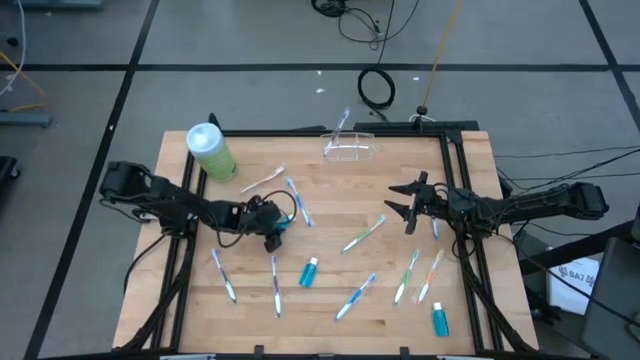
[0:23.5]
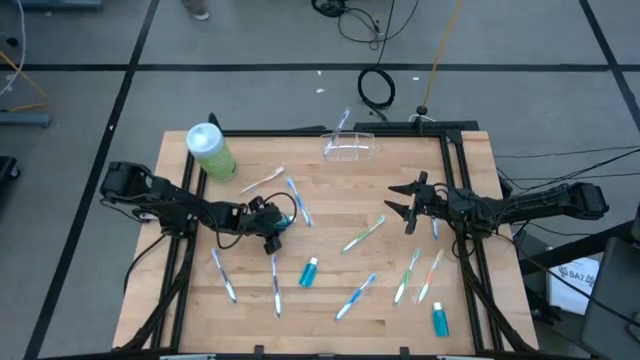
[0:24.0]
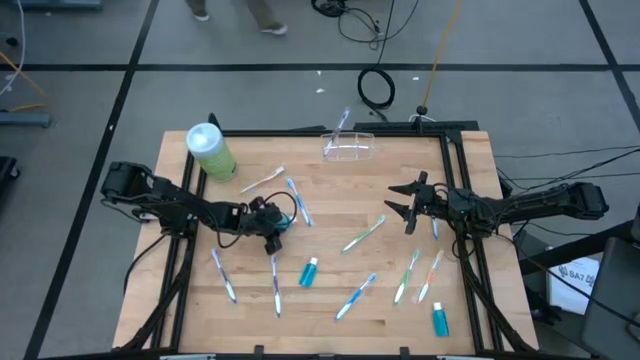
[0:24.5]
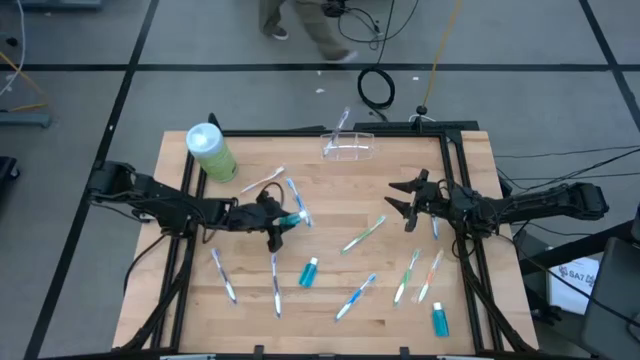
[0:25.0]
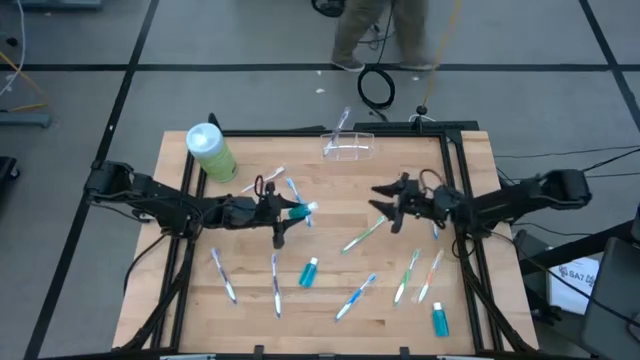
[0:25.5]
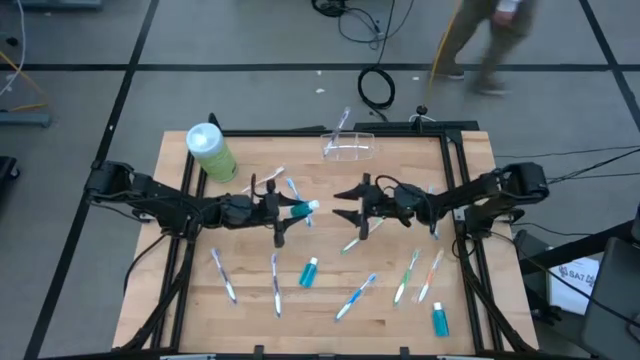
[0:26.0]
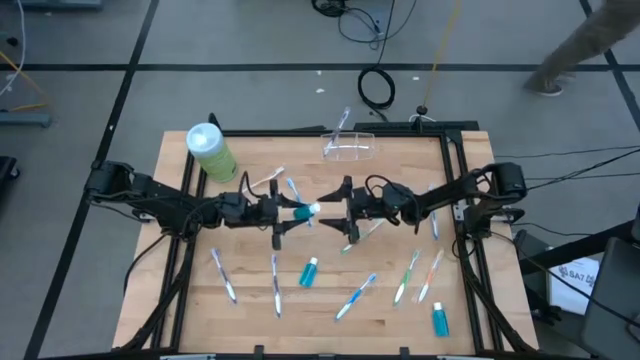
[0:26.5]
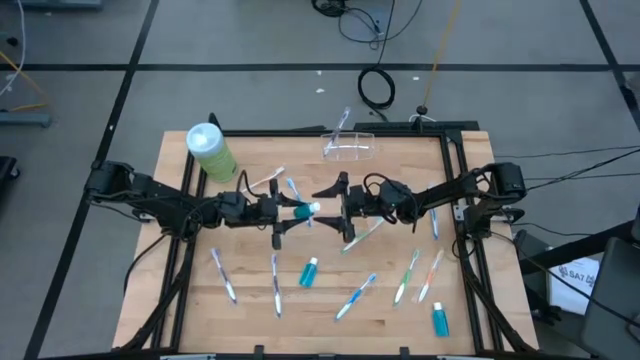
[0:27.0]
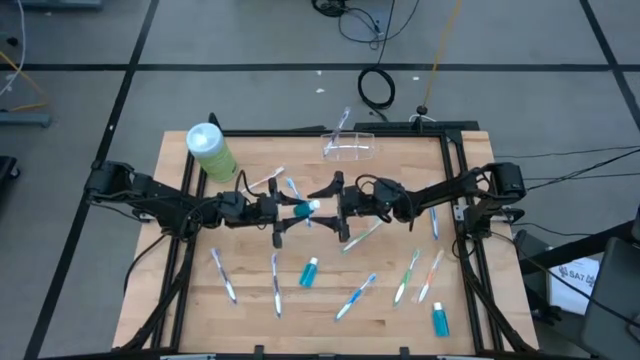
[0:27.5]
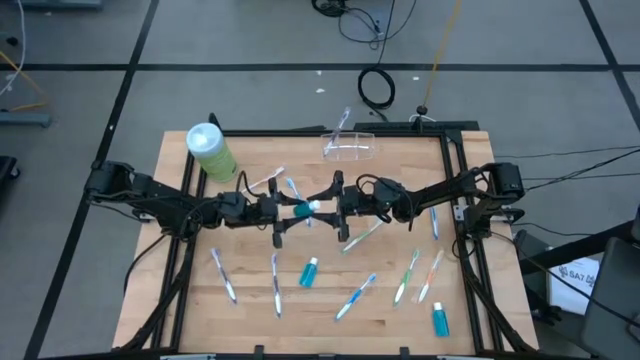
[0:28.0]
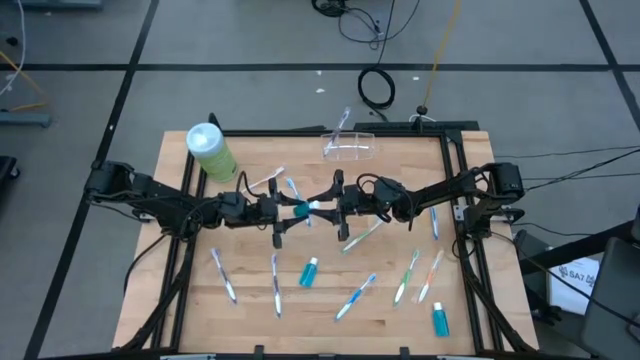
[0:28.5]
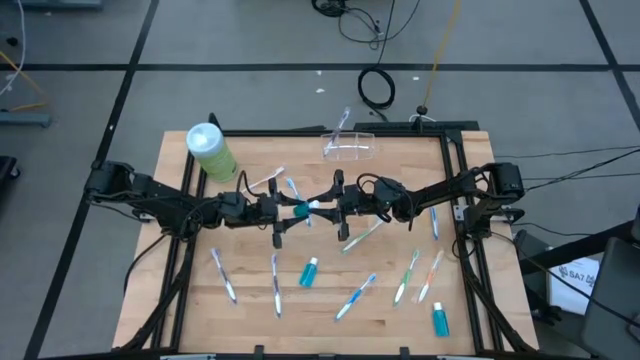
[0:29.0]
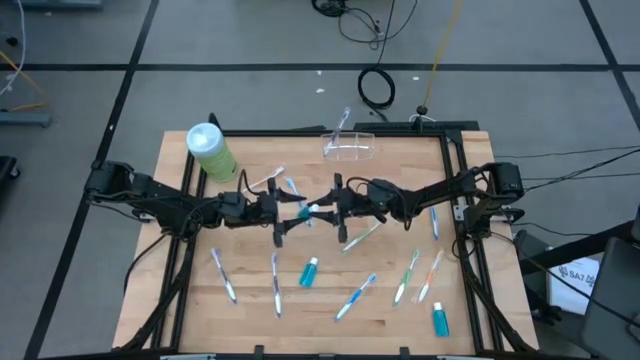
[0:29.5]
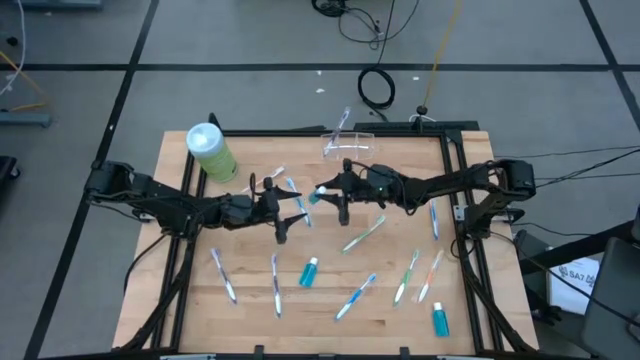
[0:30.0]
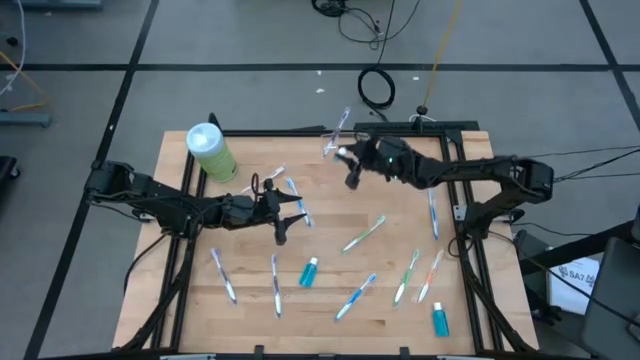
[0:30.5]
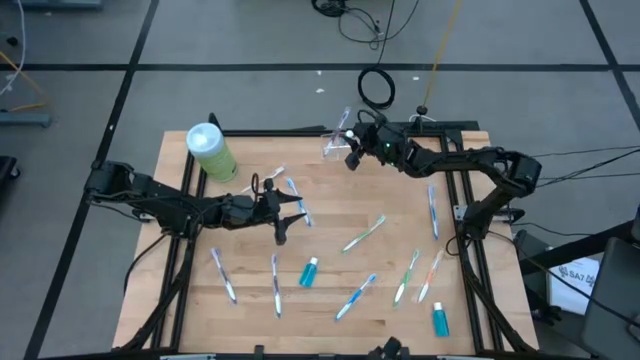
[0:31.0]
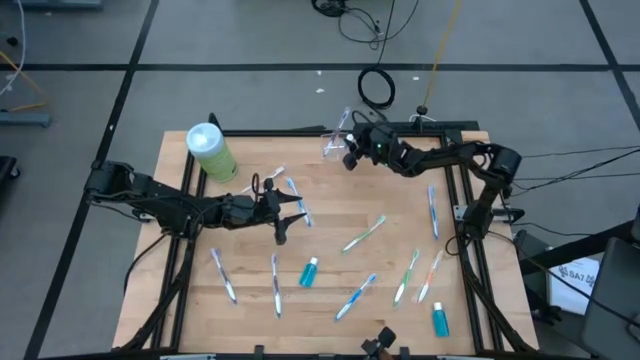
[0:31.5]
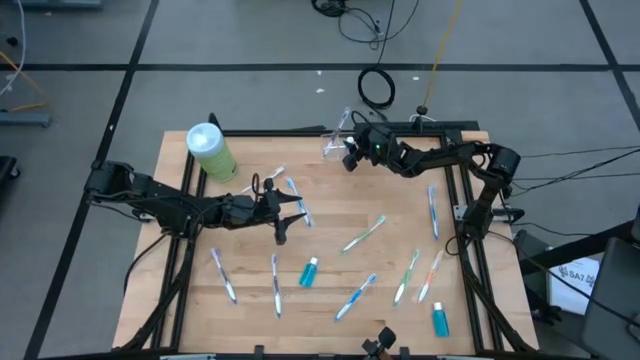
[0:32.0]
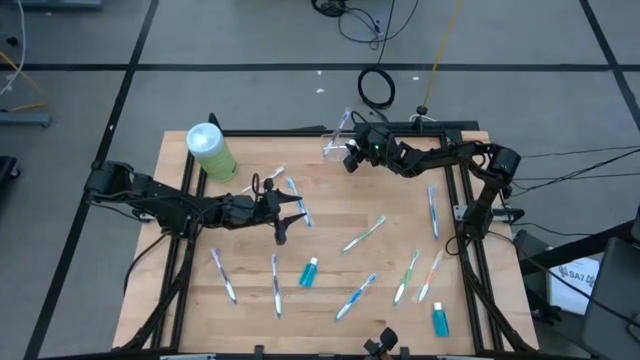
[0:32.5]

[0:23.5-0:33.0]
Task: Pick & Place toothbrushing station
Put the top left small mouthwash bottle into the middle section of the transparent organizer

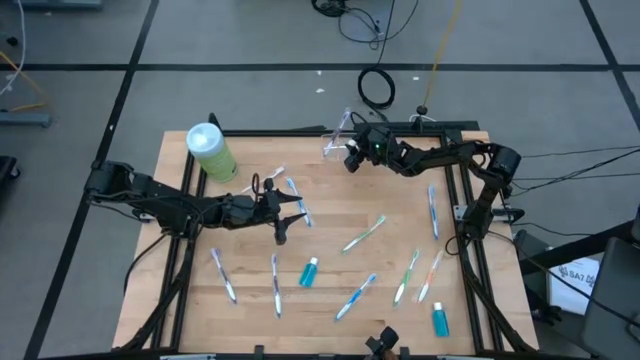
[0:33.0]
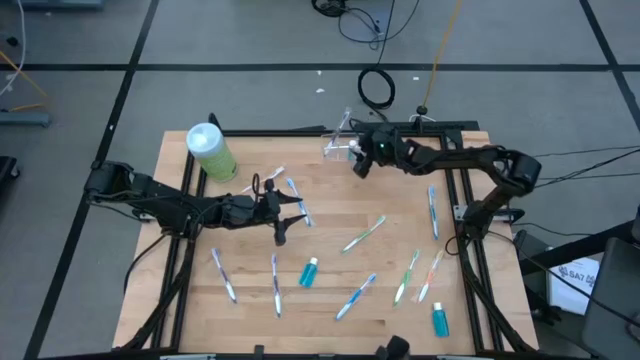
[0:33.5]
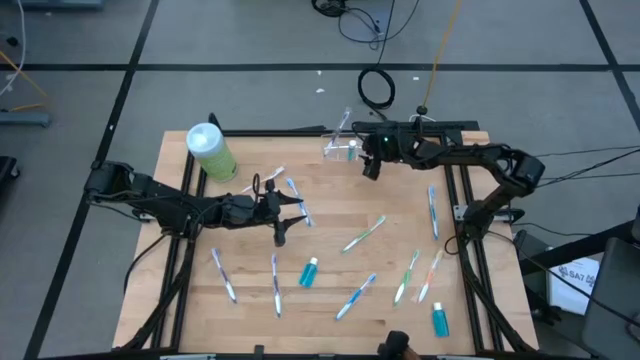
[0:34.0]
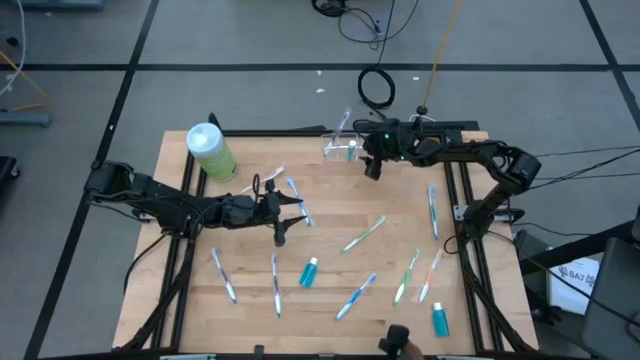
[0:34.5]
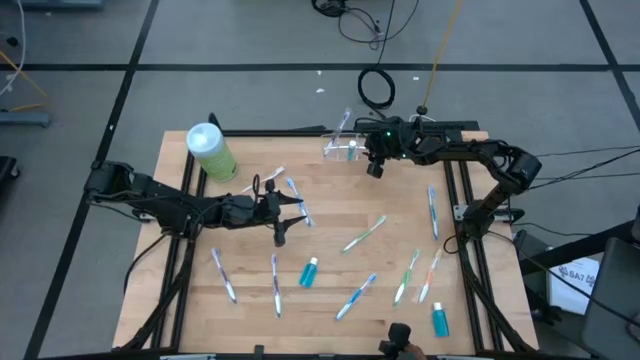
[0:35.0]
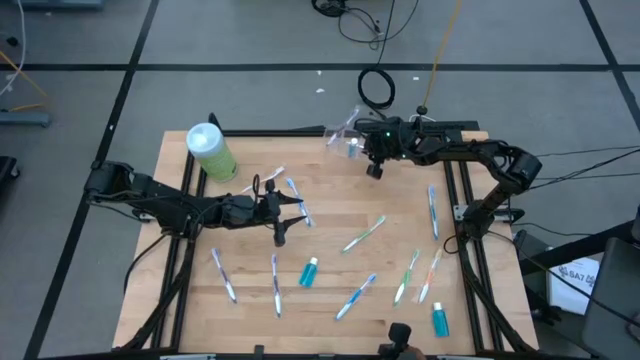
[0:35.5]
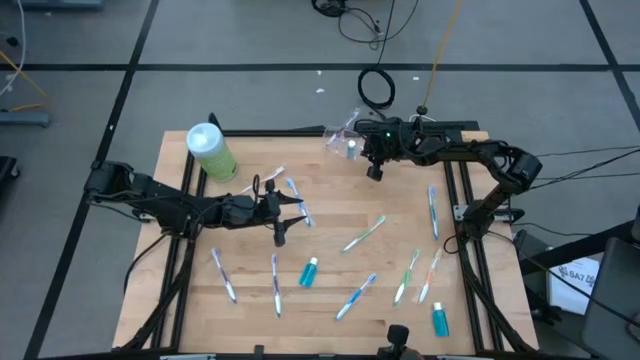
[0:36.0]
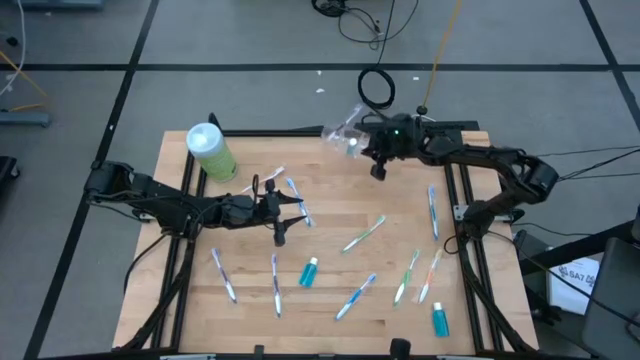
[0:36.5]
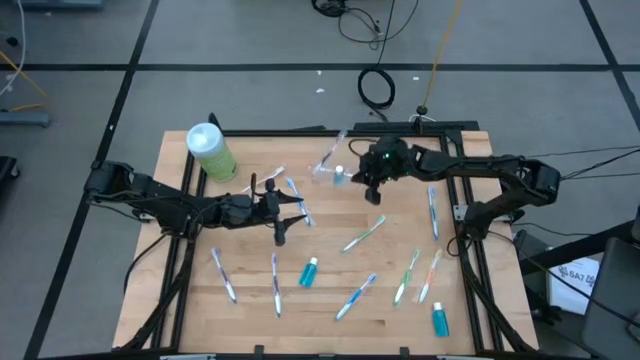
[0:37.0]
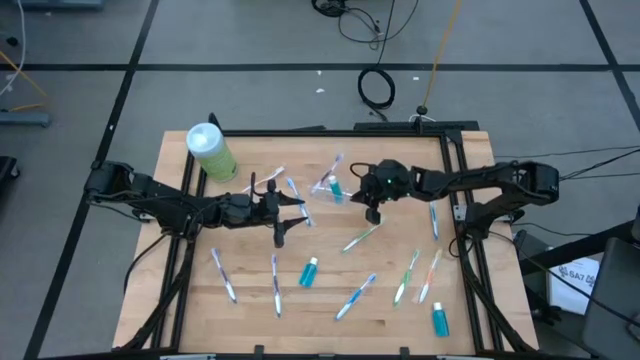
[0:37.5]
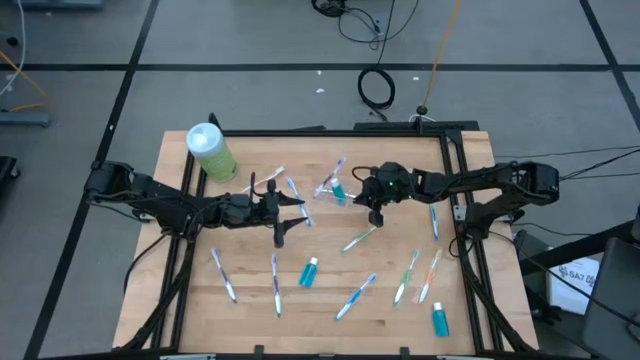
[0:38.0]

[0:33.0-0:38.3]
Move the transparent organizer to the middle of the table

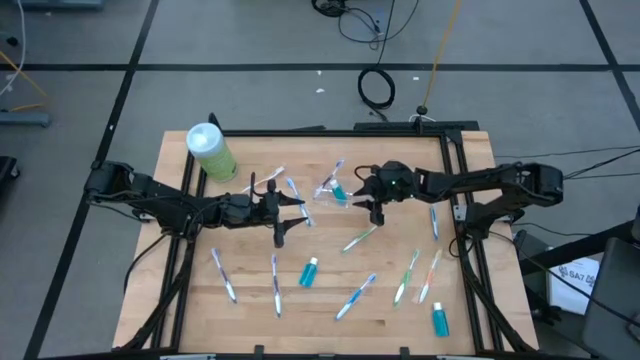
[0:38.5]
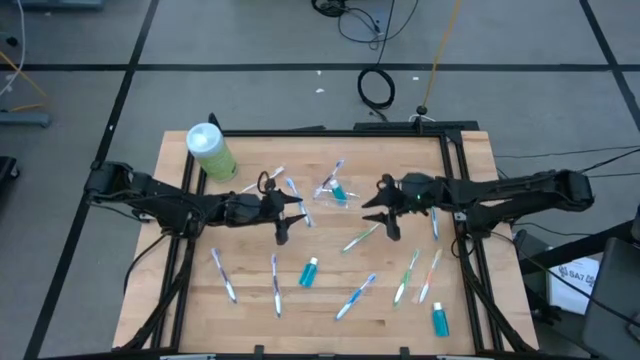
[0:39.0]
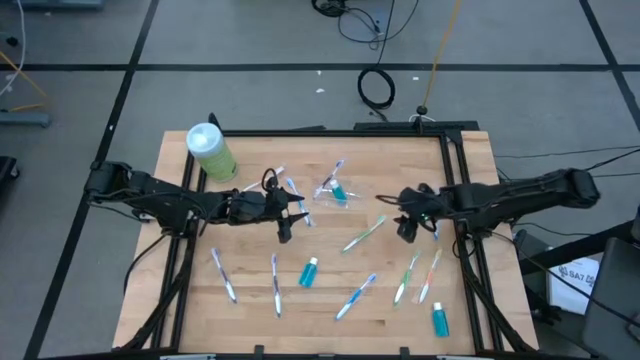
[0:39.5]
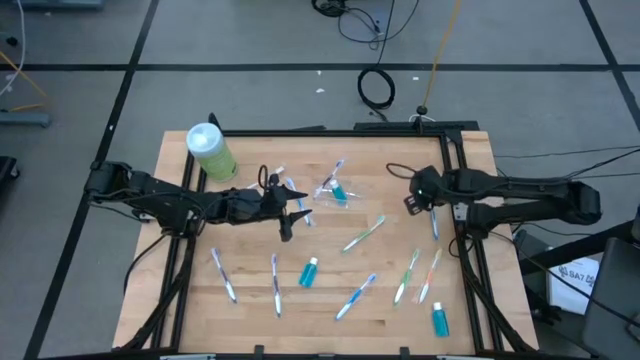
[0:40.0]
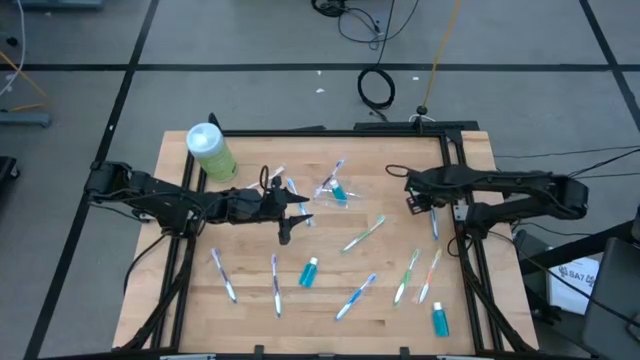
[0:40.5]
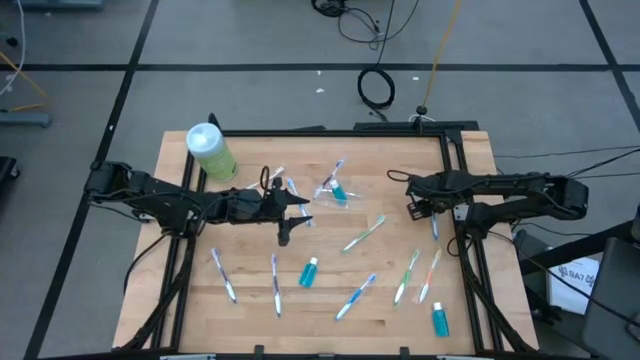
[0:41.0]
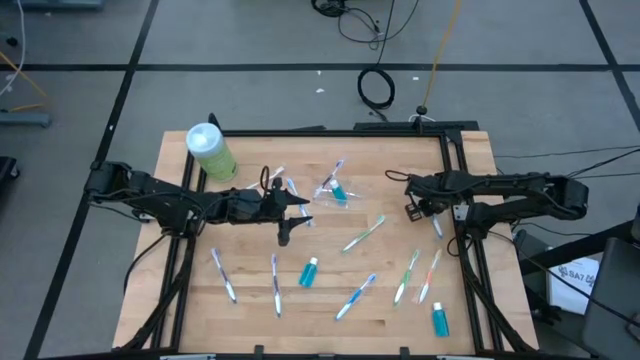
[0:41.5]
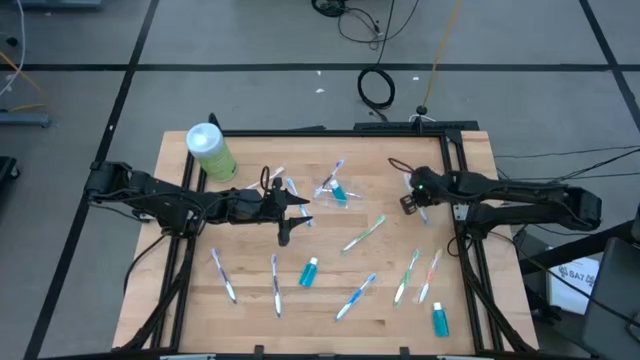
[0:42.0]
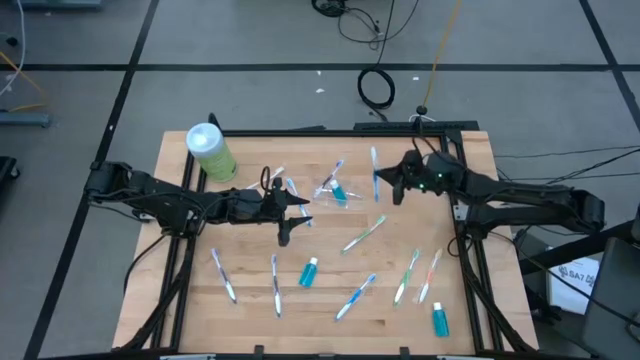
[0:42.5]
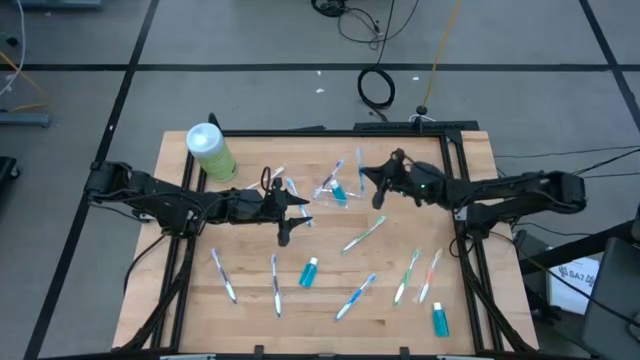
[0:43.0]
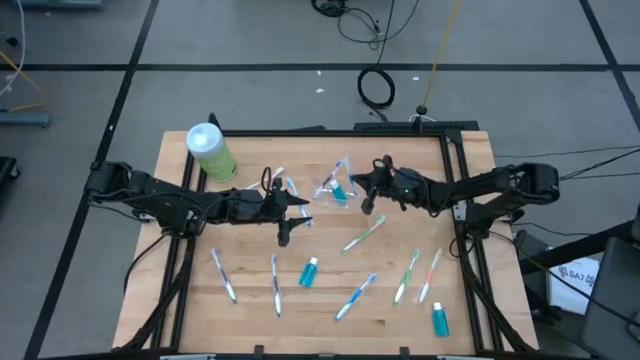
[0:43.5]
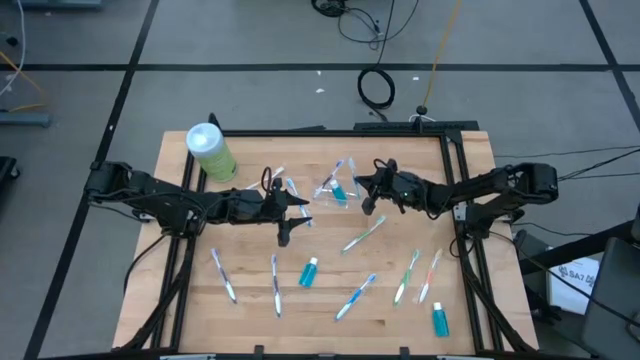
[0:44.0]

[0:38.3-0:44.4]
Put the right blue toothbrush into the right section of the transparent organizer
